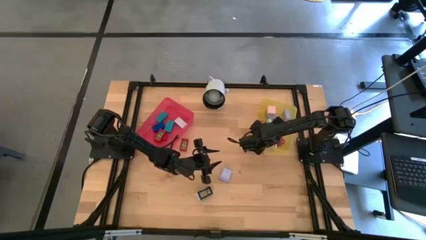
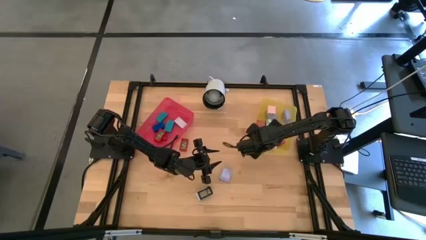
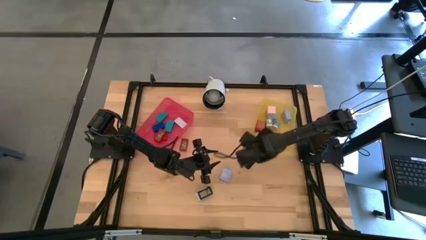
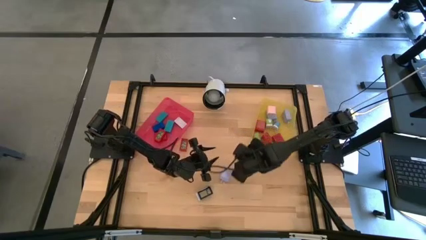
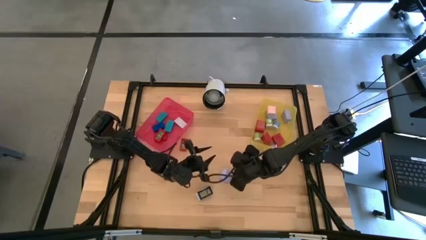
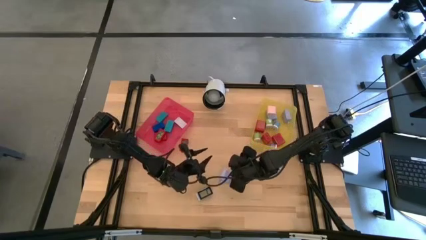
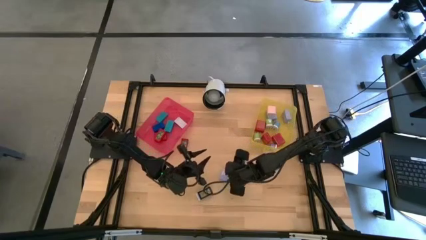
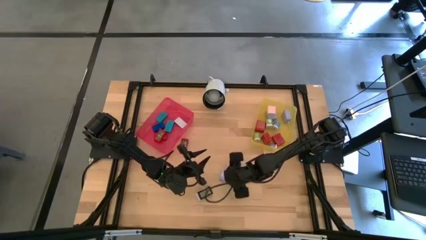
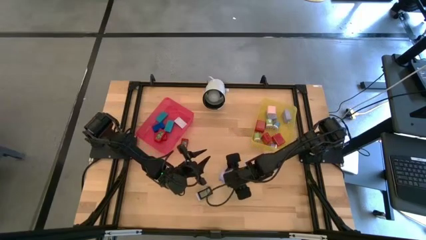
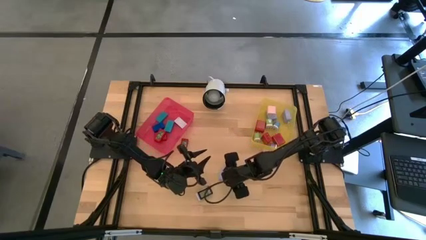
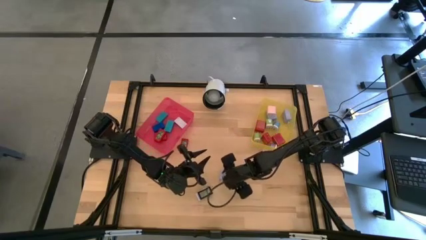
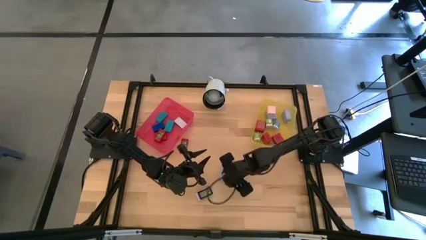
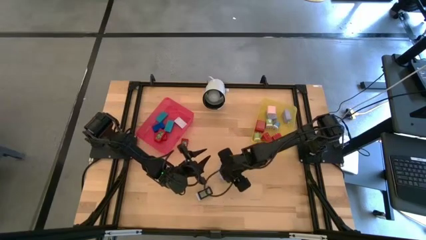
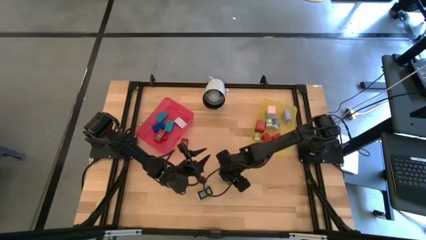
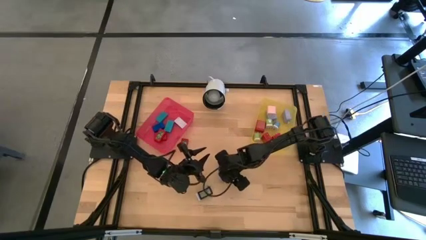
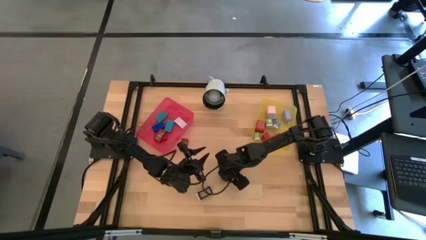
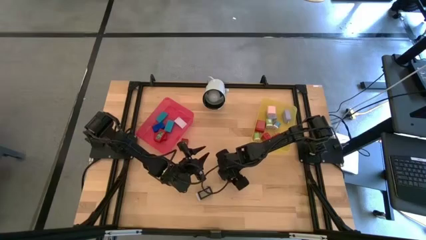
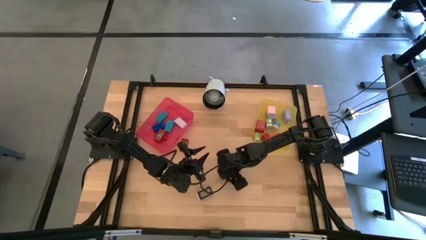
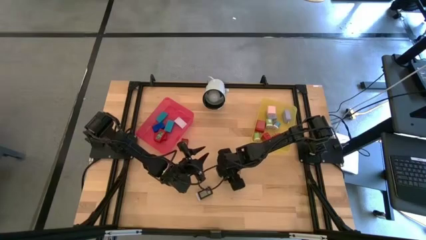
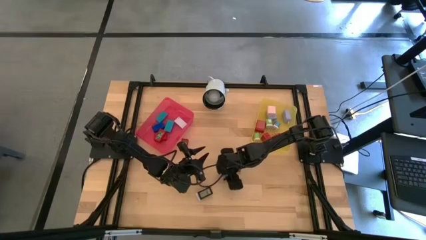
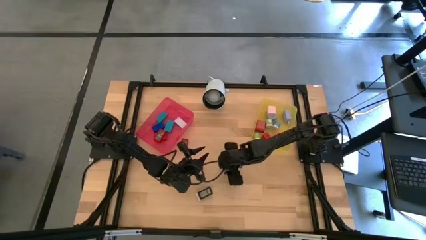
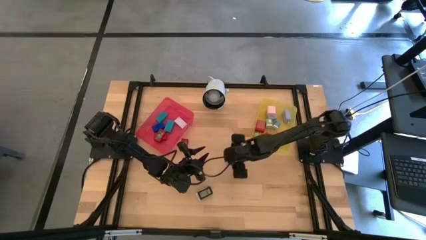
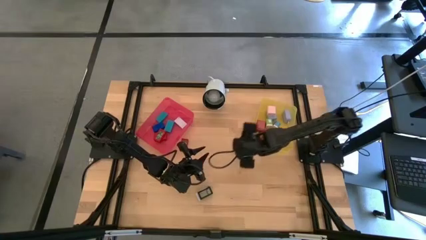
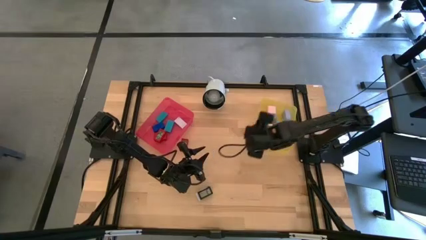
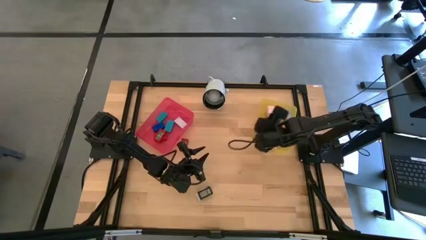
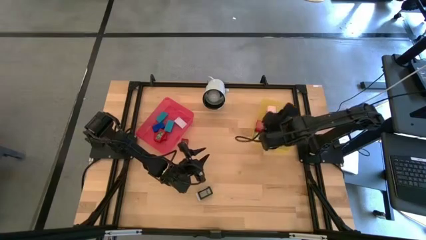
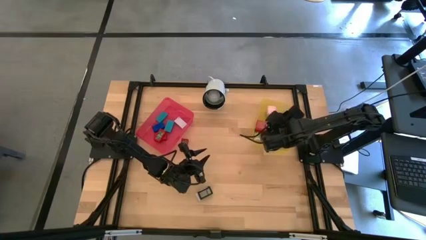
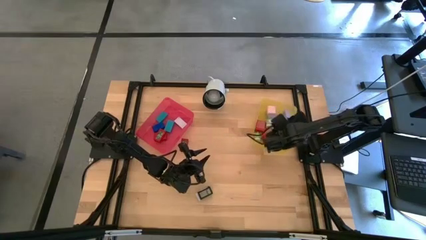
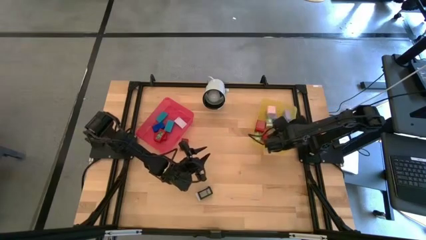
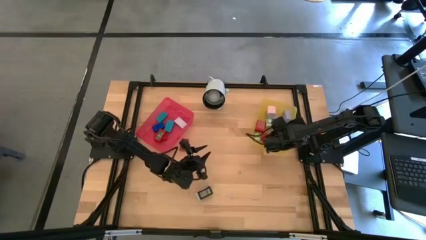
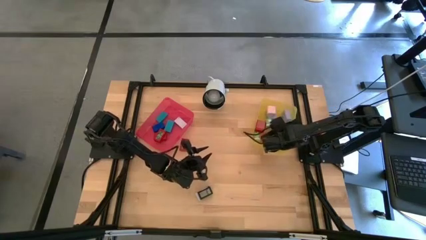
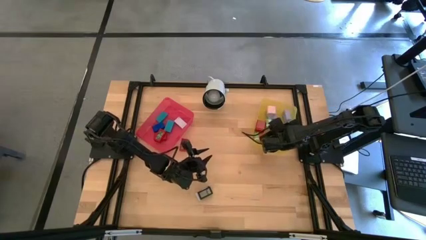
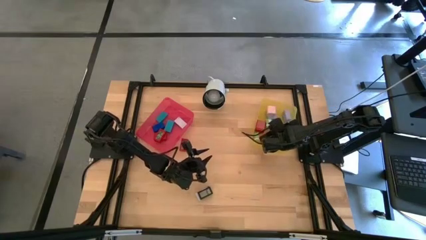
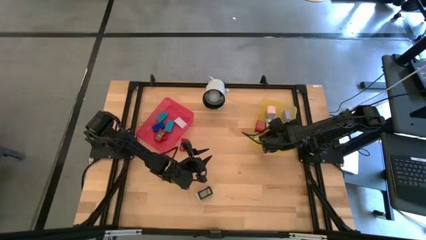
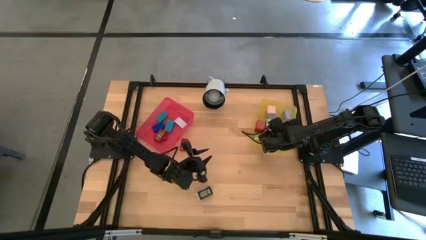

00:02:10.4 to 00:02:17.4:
Task: Pick & Place Office items
Put the purple charger adapter into the yellow bin

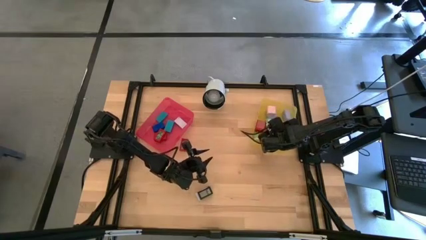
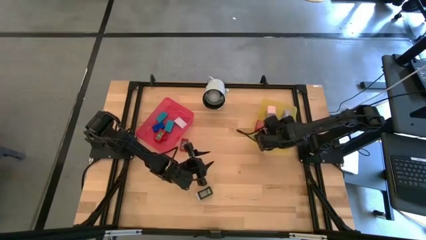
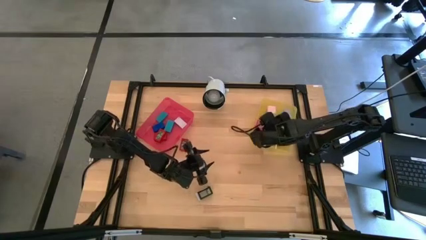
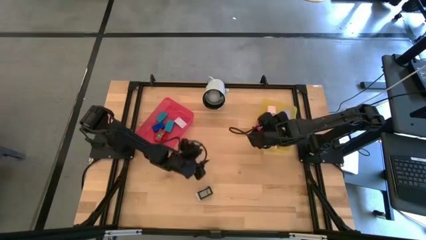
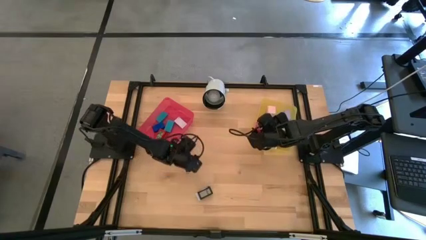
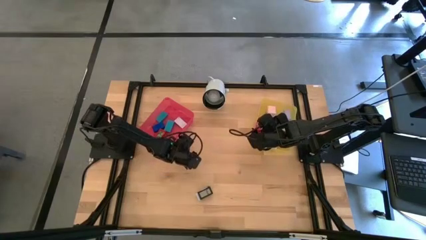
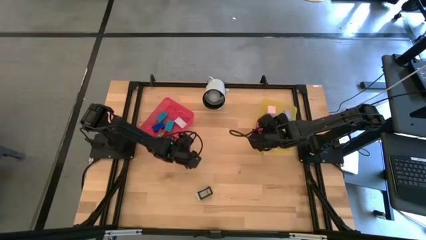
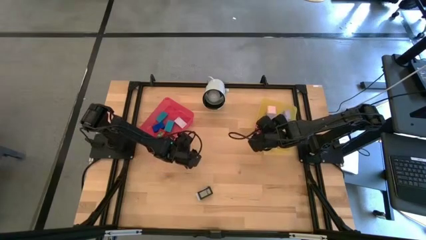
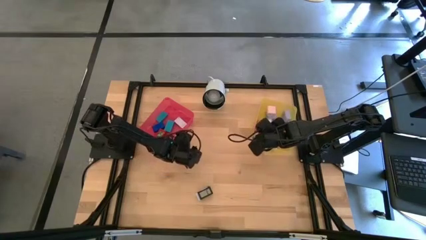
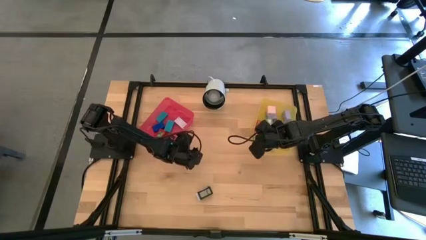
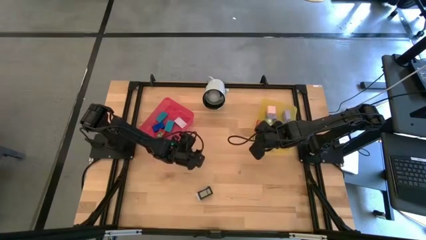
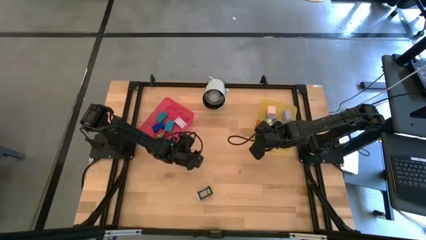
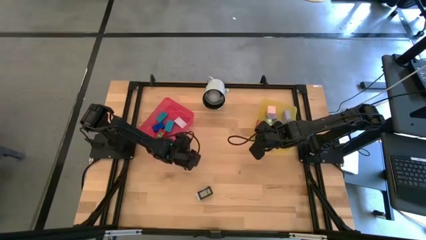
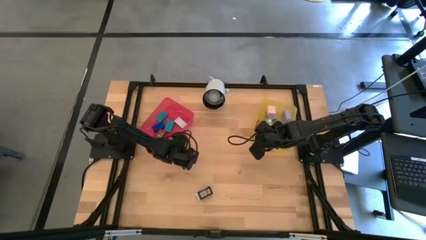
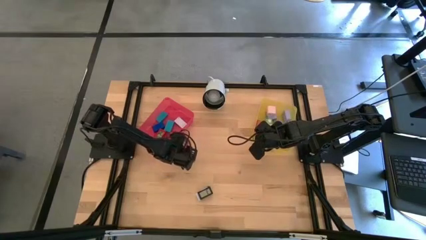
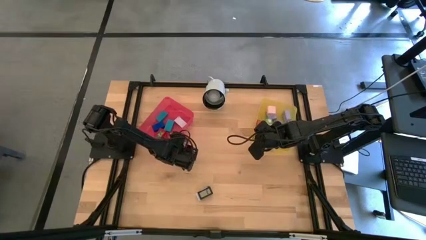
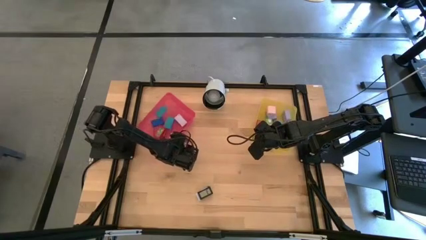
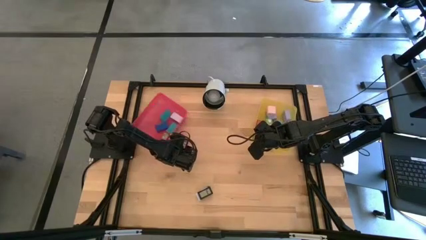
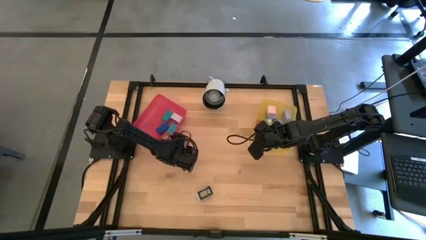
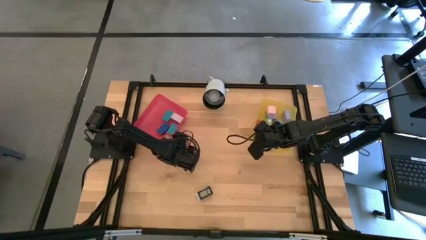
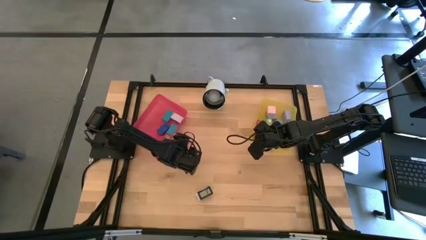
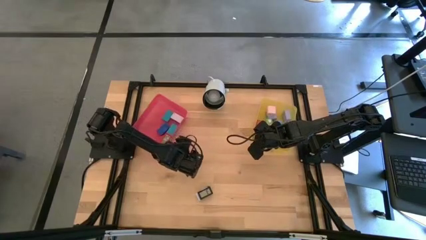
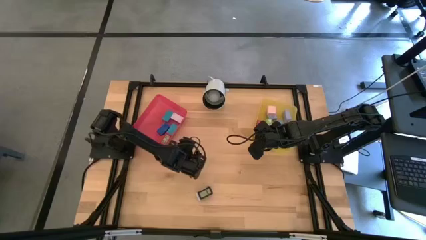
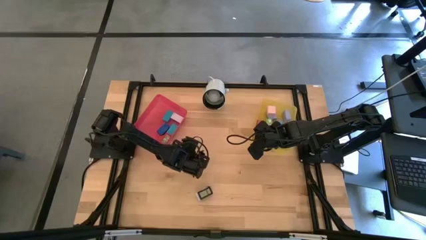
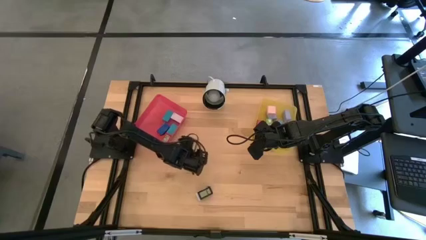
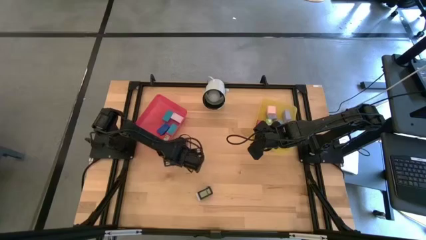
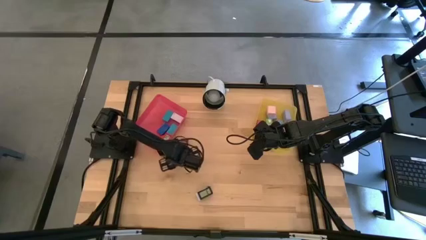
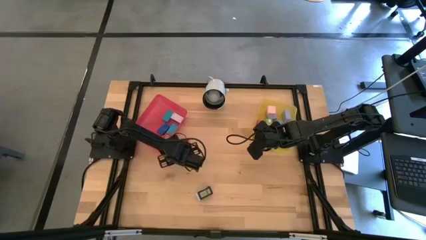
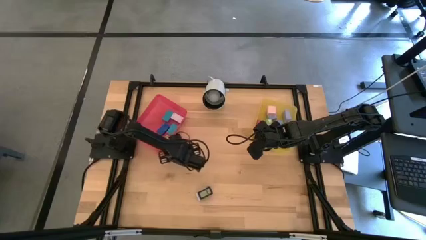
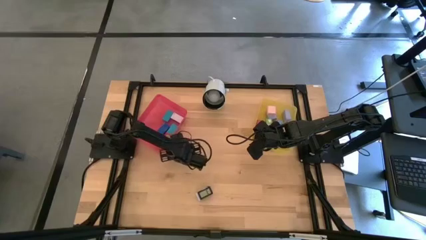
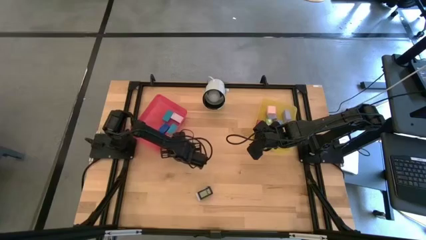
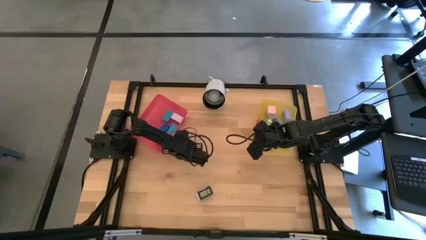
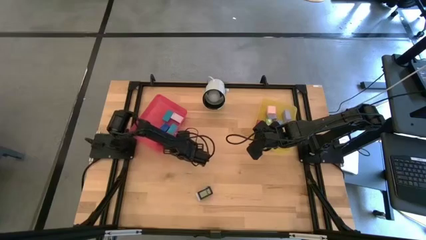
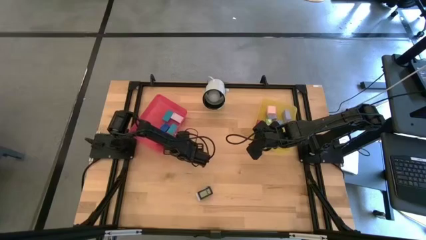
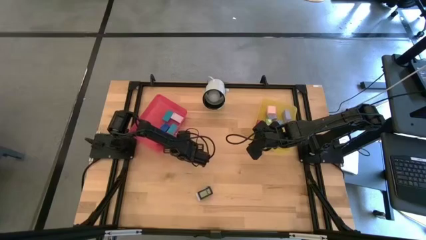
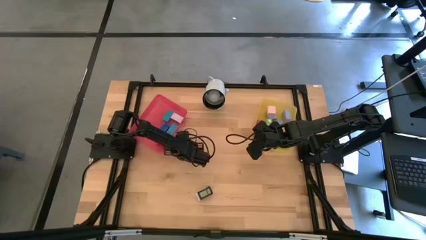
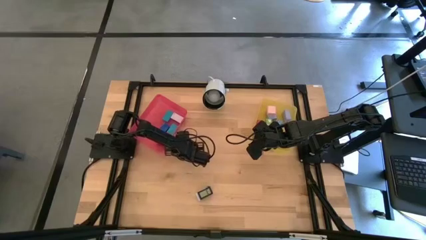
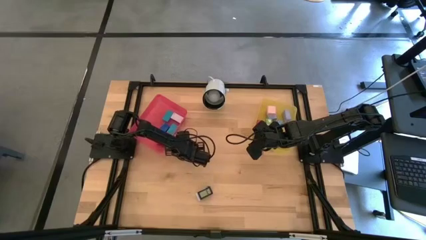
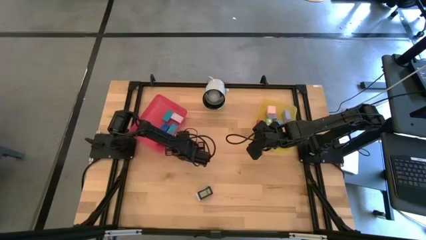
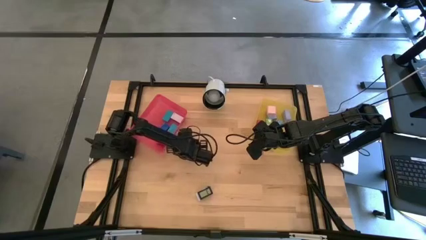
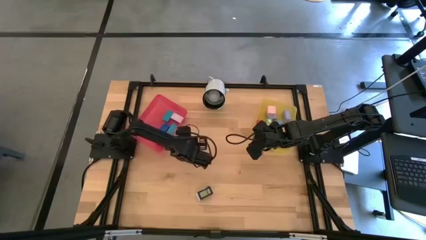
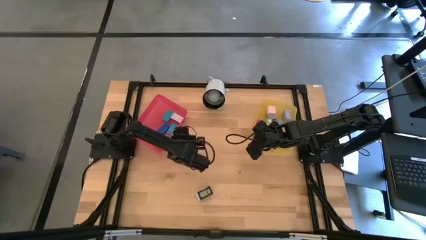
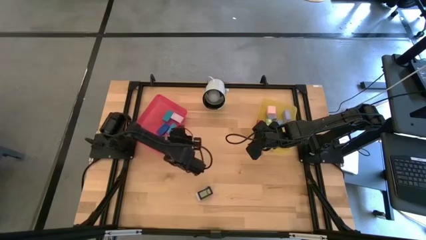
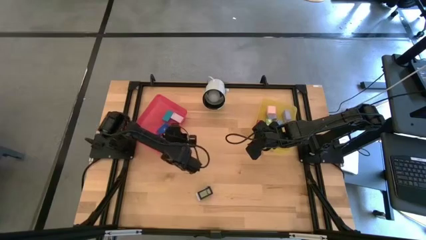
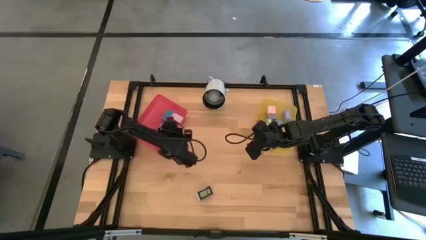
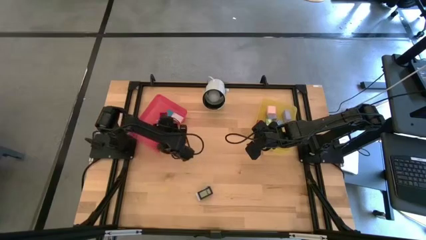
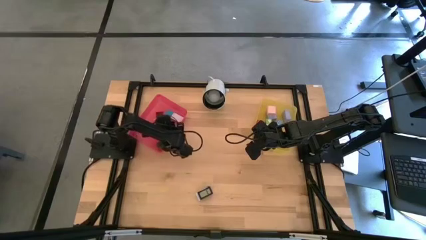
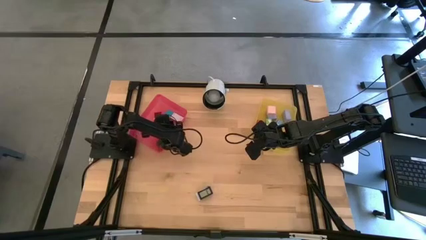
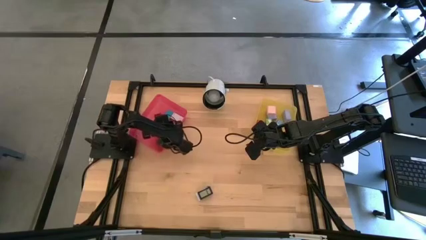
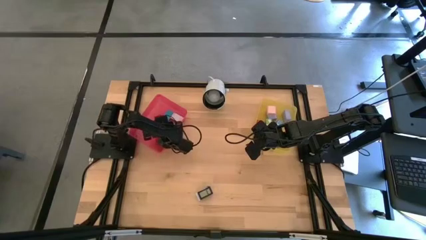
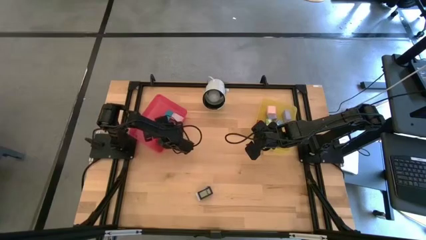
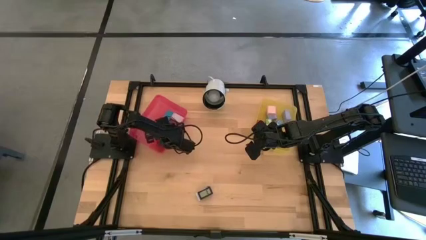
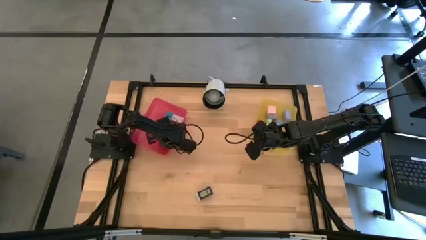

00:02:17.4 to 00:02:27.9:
Put the red digital timer into the pink bin
